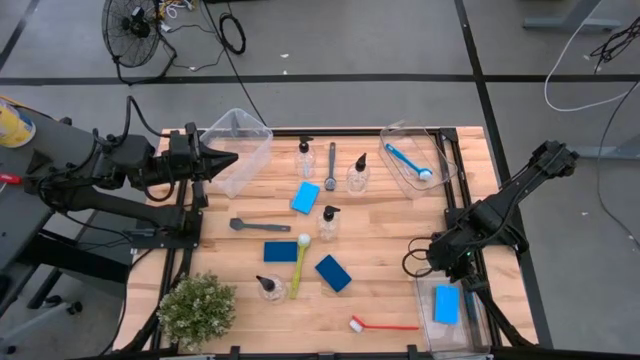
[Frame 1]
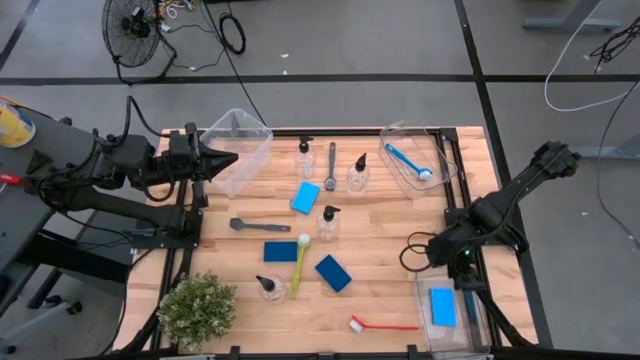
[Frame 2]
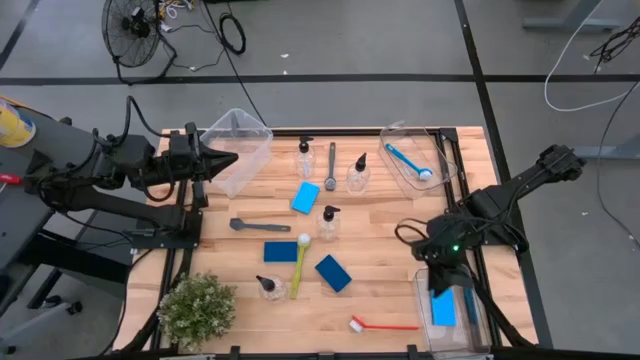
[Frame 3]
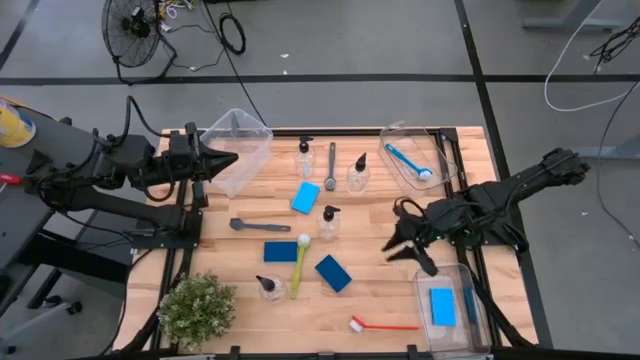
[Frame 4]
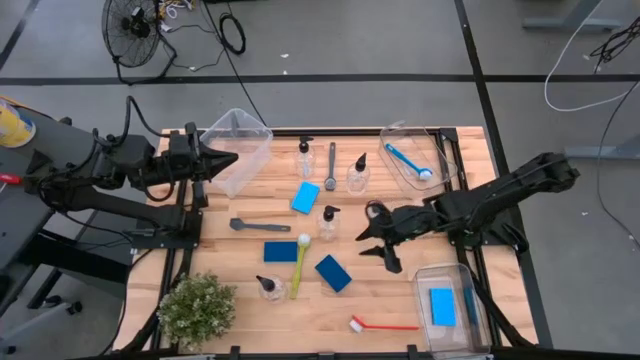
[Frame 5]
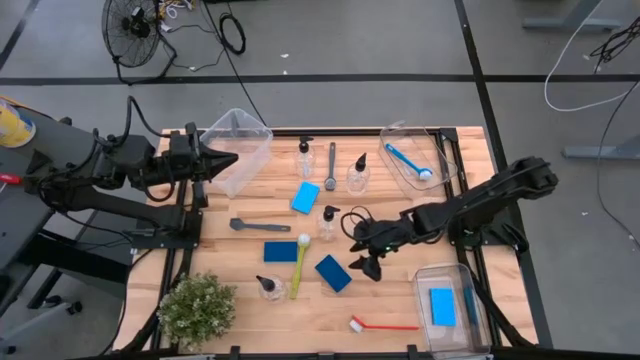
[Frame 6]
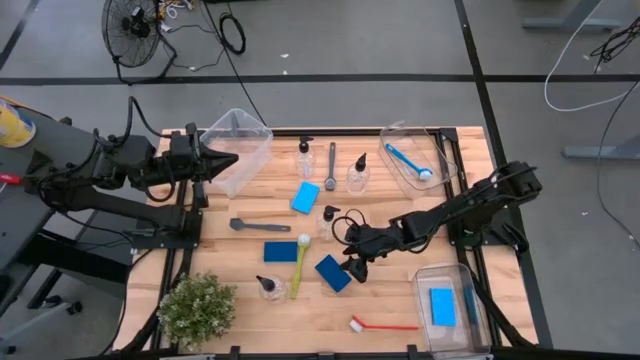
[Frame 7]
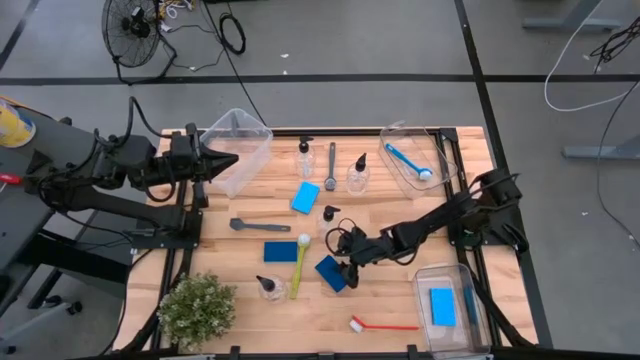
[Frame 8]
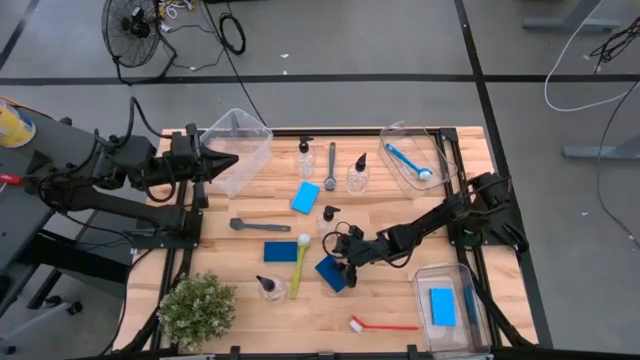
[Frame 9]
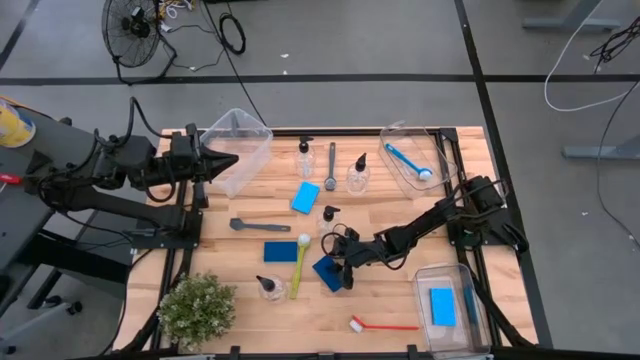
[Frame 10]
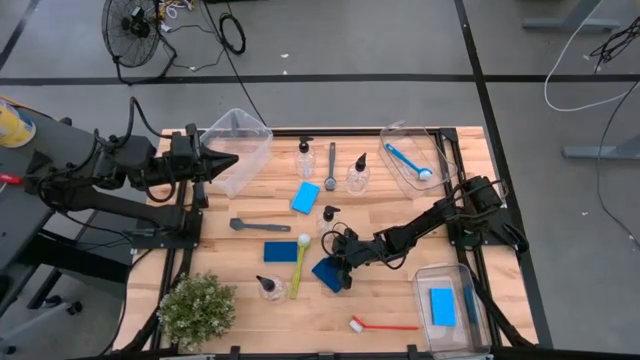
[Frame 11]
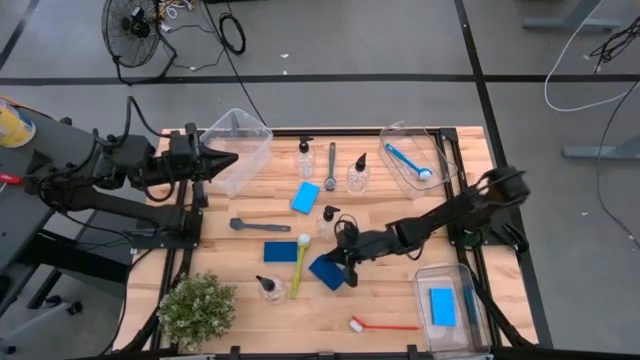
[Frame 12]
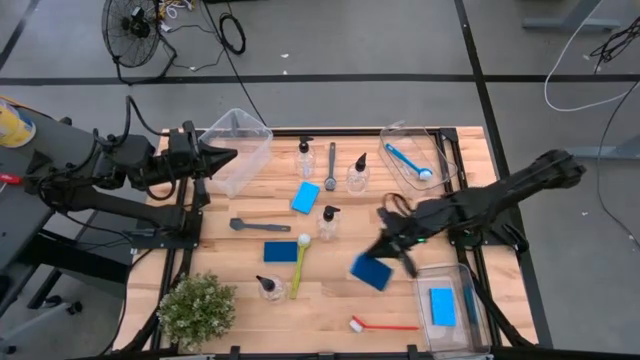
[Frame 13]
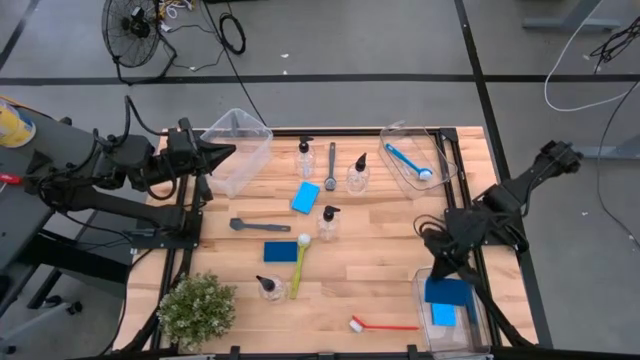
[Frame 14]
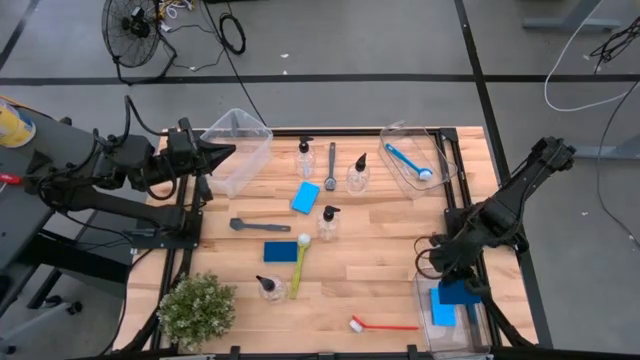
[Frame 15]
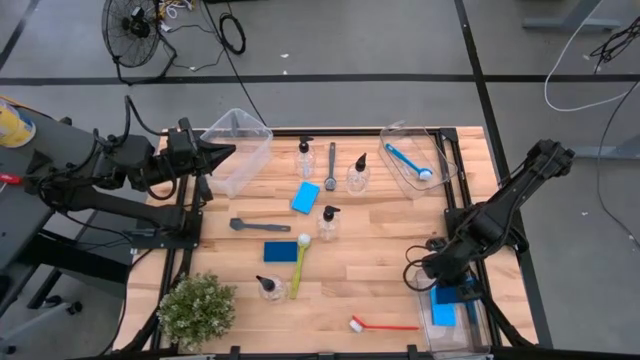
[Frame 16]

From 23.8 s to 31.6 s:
Task: Pick & Place Kitchen Sink Supplies
Put the blue sponge into the bottom transparent bin

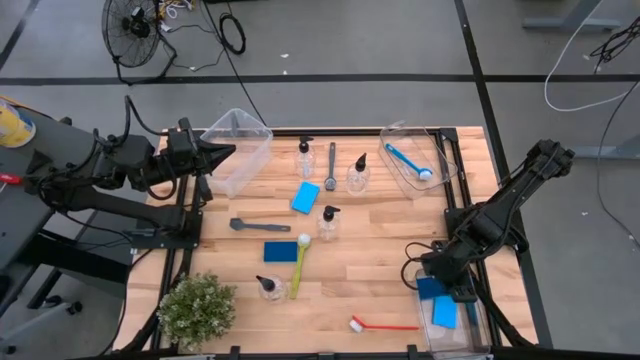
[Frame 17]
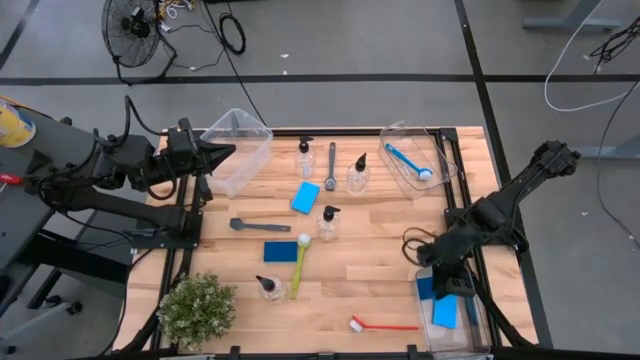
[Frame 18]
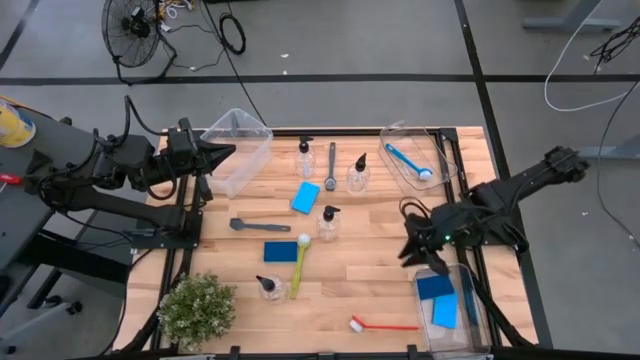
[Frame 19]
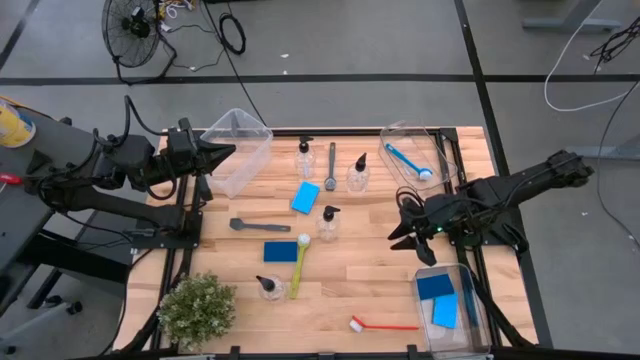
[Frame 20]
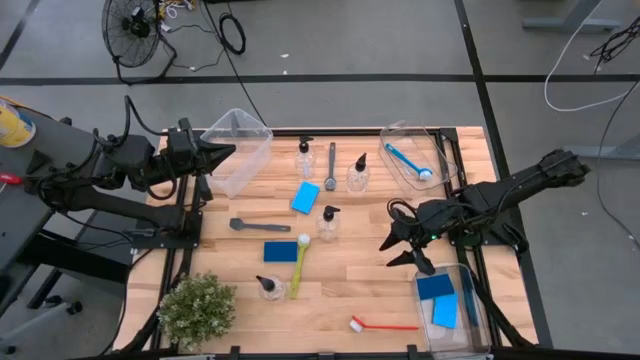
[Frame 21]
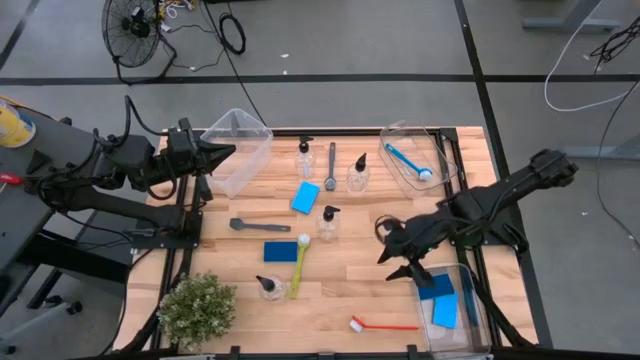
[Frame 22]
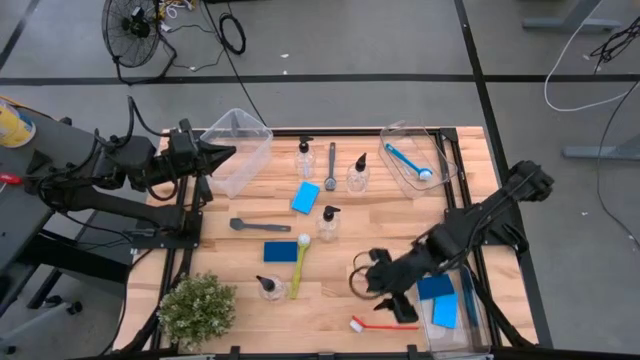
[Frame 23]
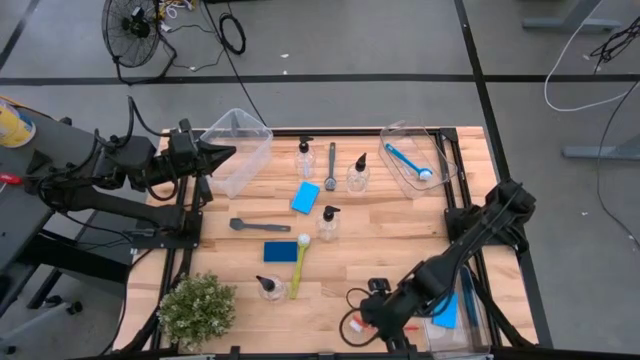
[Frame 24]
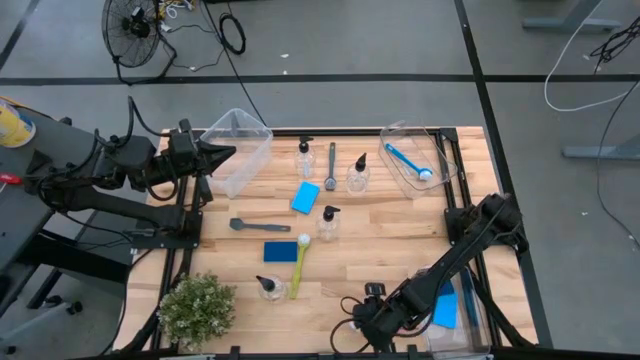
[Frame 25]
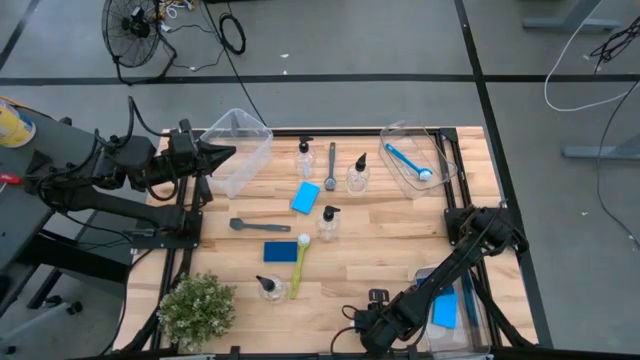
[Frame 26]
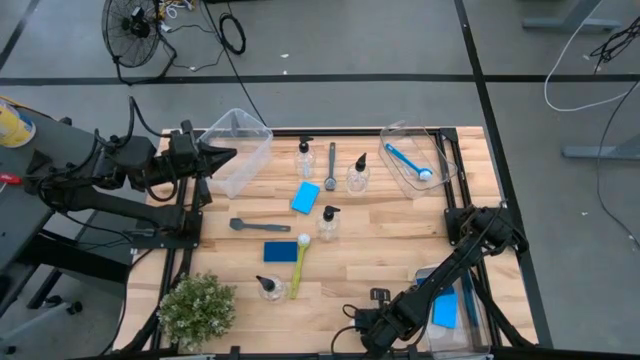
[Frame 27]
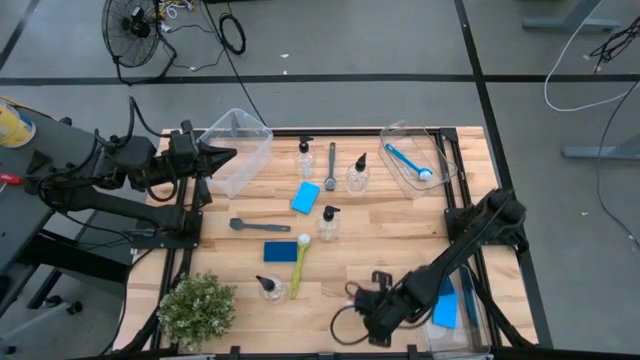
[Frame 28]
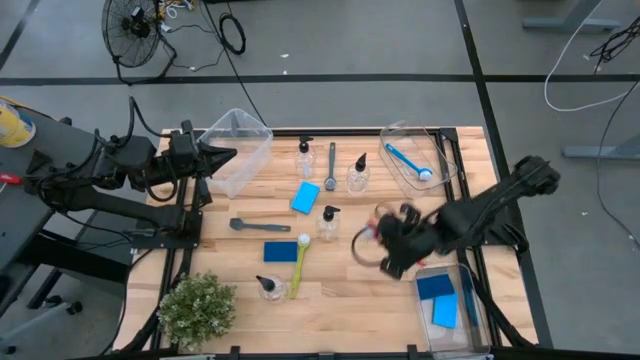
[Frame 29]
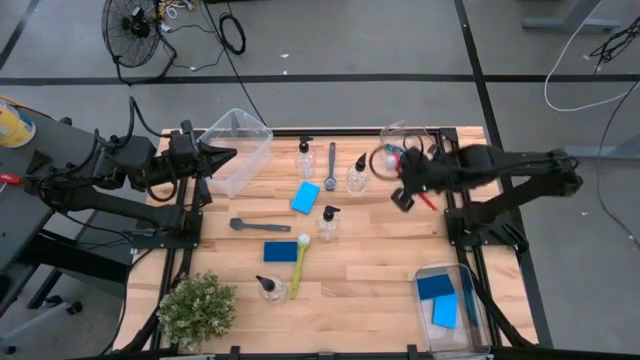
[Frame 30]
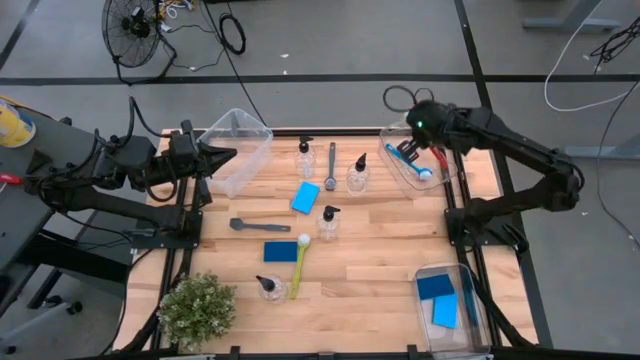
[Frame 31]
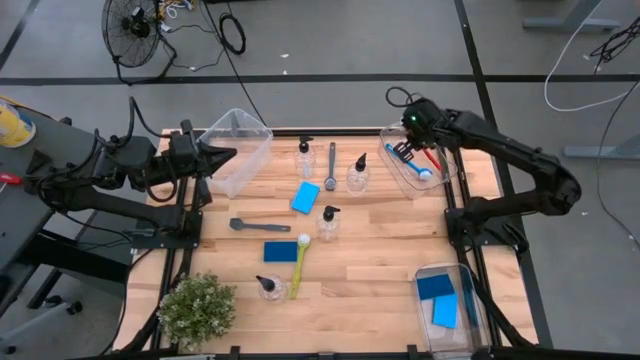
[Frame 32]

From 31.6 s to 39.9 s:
Put the red cleaning brush into the top transparent bin

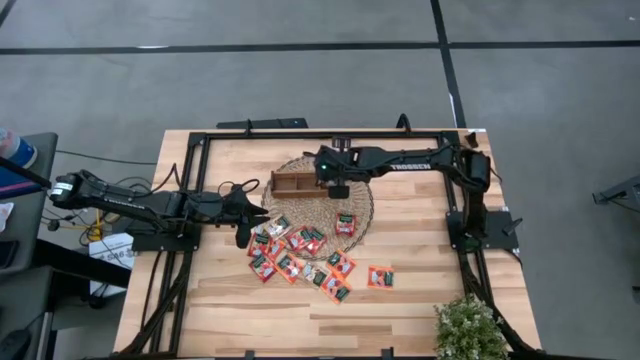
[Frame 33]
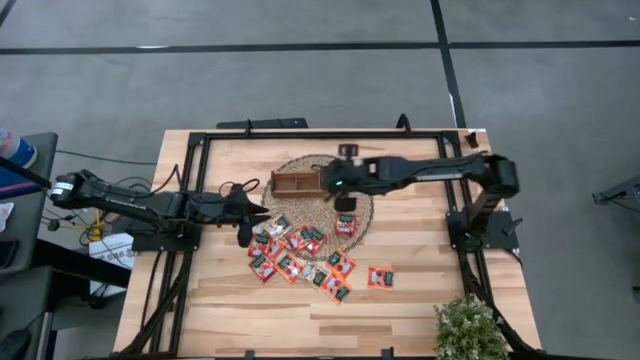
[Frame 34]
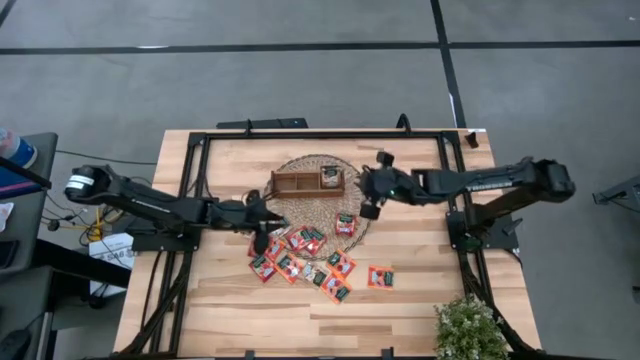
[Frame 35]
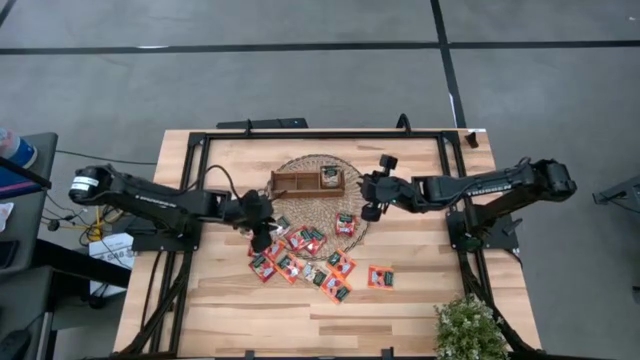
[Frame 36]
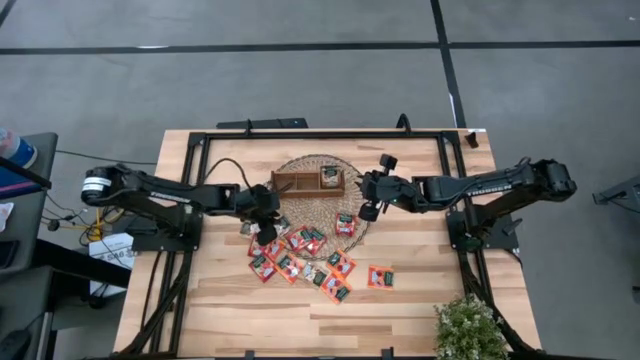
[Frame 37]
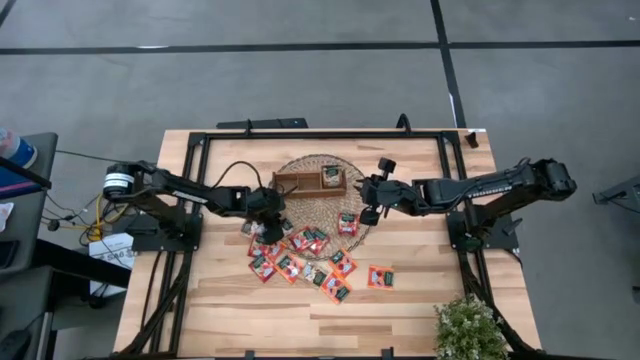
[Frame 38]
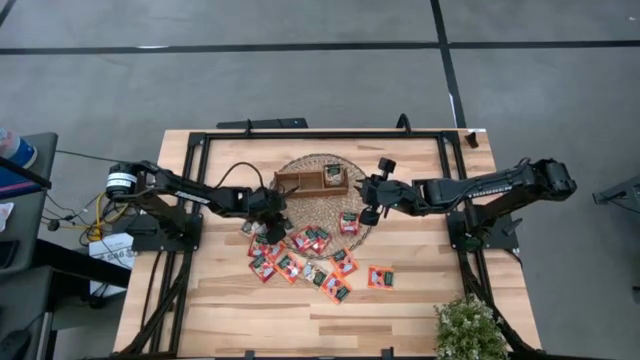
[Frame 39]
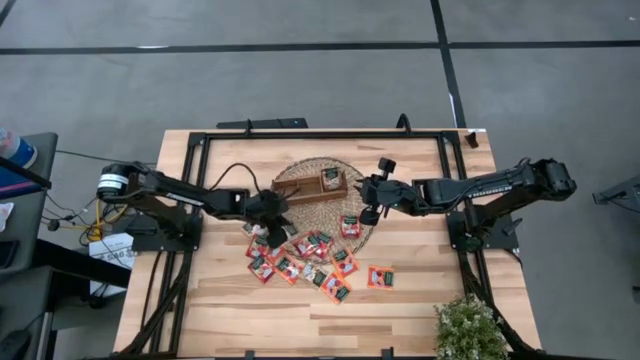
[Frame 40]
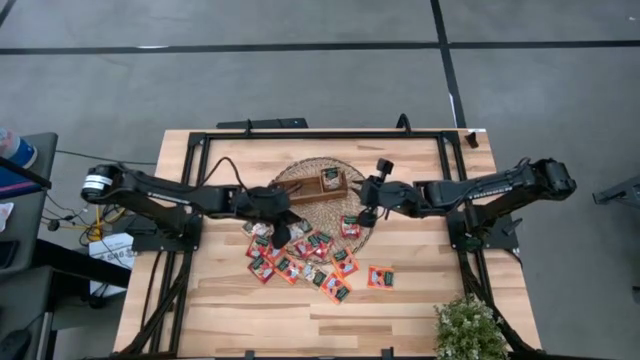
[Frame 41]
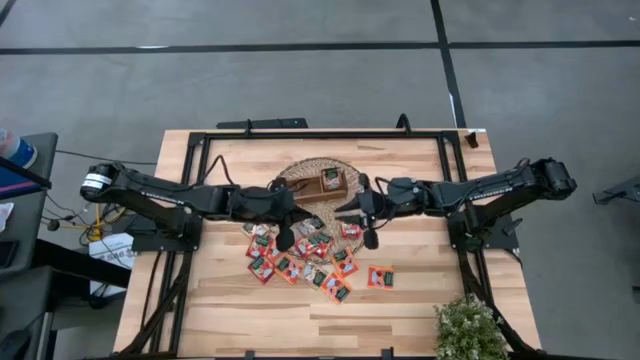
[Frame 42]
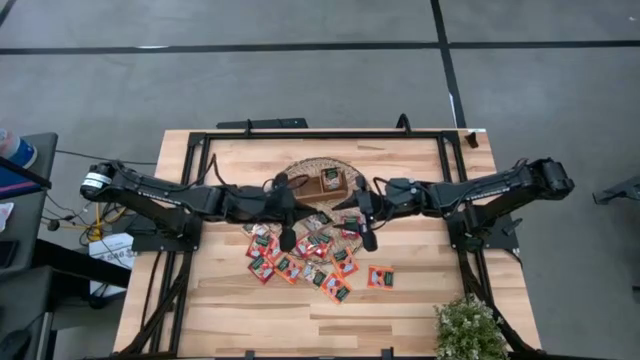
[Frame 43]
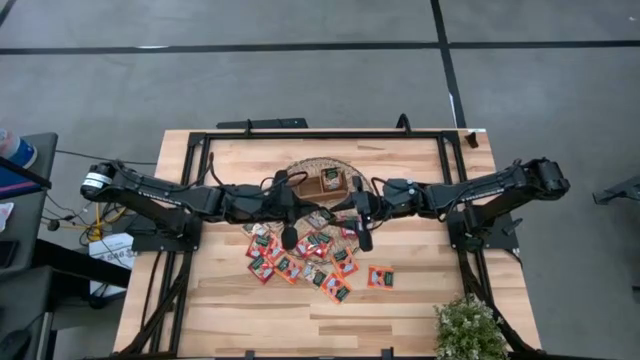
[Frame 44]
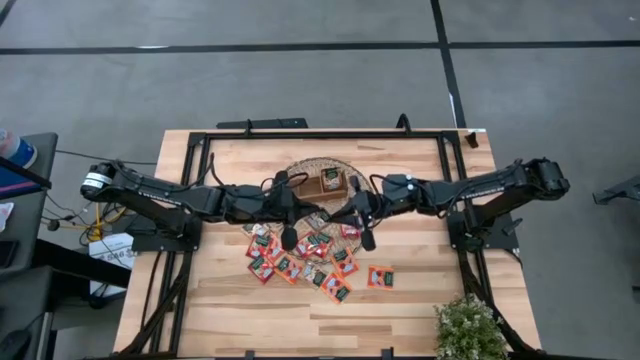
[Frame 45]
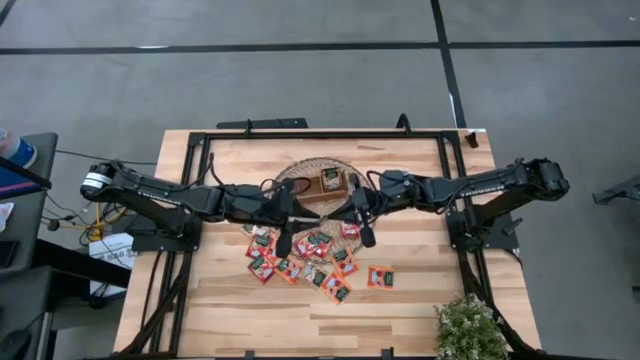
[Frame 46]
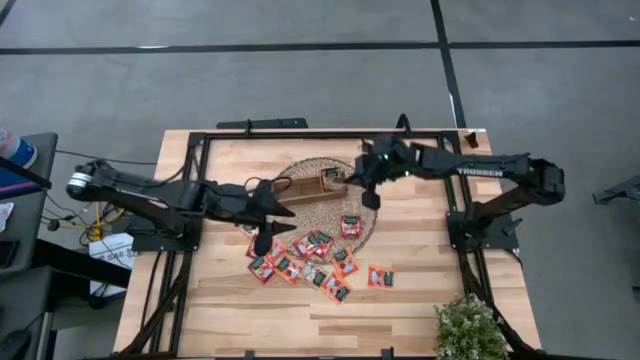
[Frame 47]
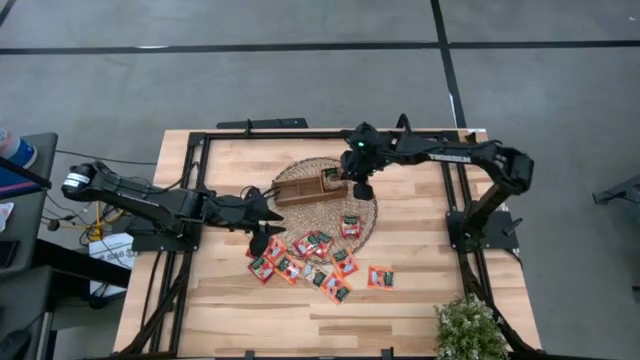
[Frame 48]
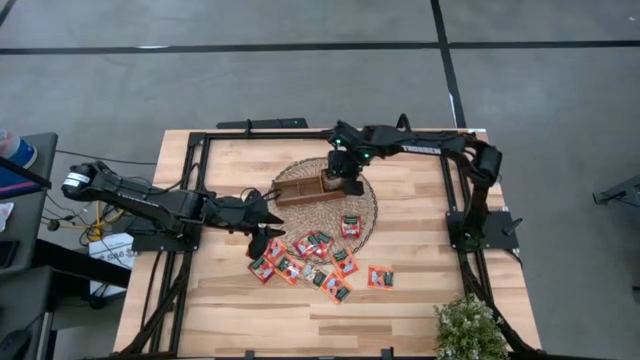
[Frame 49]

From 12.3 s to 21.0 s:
Task: Pick & Place Tea
Put the top right brown tea bag into the right section of the wooden organizer
